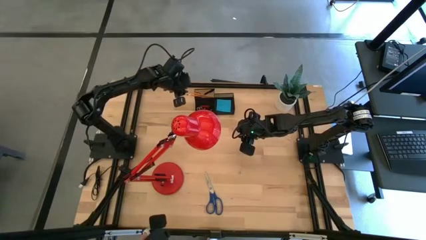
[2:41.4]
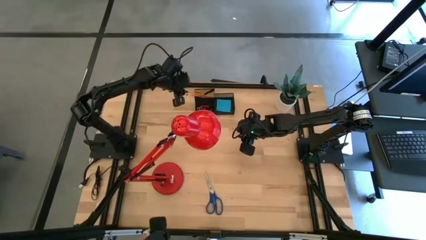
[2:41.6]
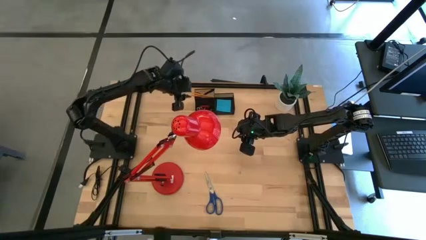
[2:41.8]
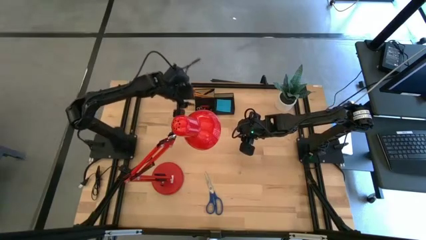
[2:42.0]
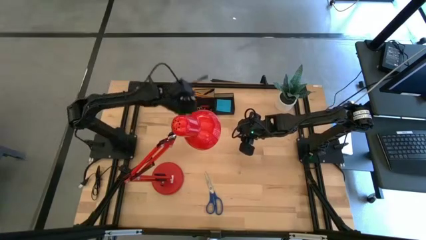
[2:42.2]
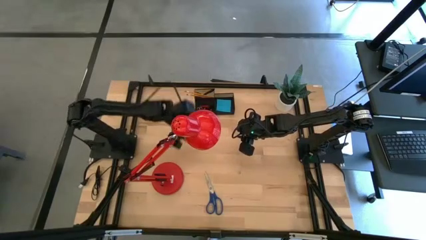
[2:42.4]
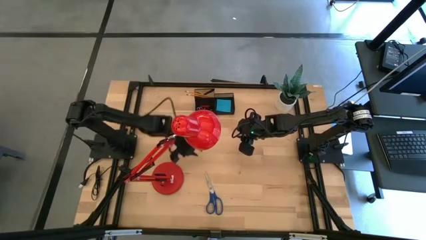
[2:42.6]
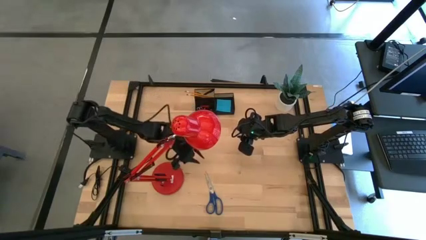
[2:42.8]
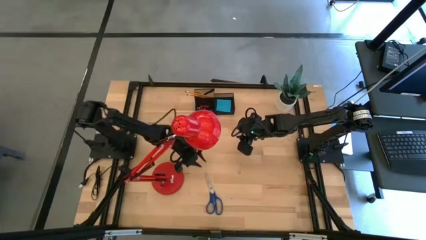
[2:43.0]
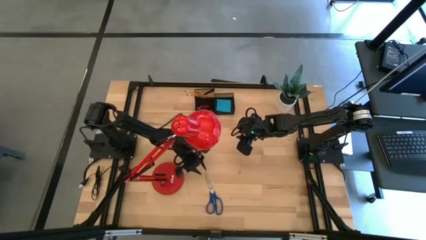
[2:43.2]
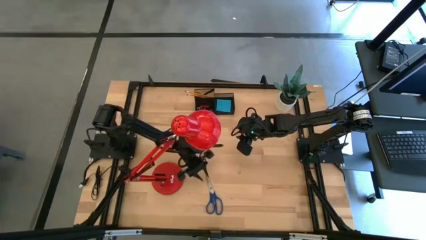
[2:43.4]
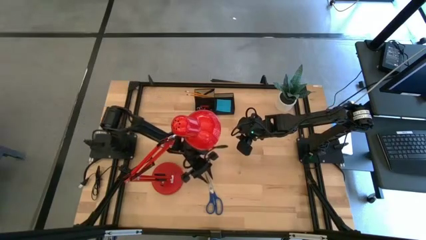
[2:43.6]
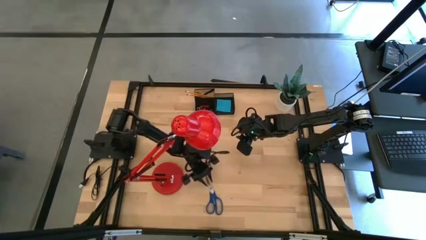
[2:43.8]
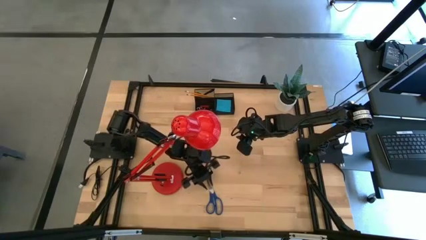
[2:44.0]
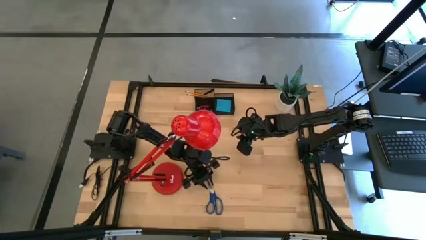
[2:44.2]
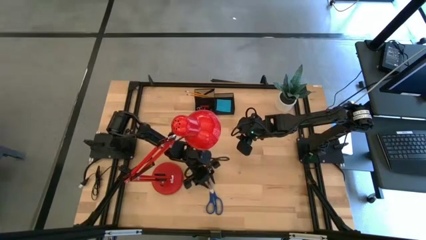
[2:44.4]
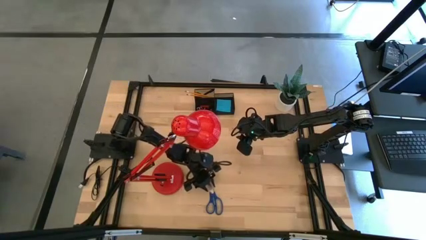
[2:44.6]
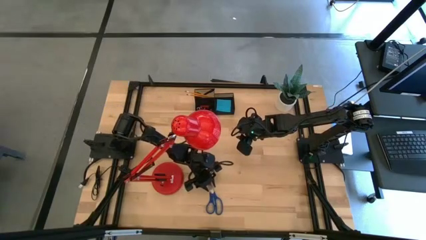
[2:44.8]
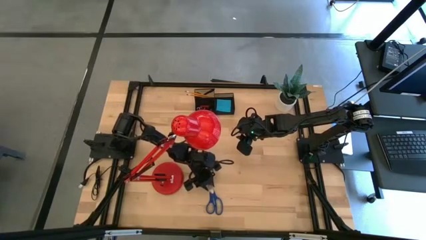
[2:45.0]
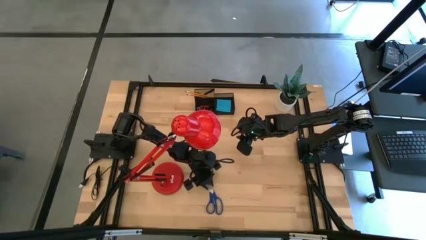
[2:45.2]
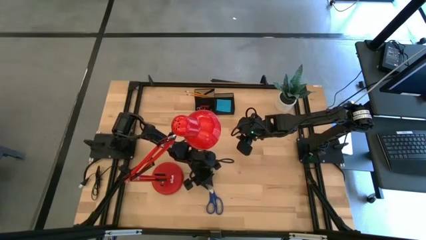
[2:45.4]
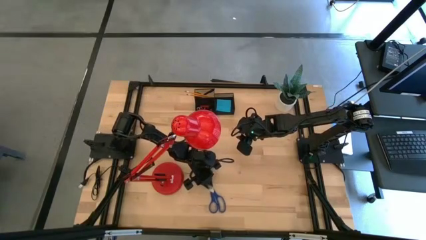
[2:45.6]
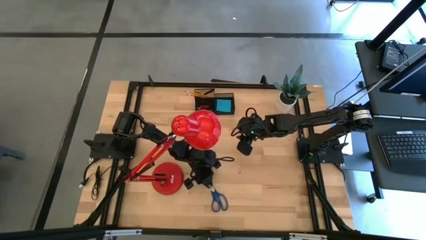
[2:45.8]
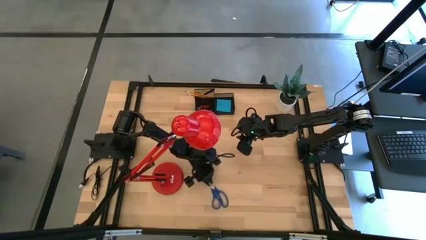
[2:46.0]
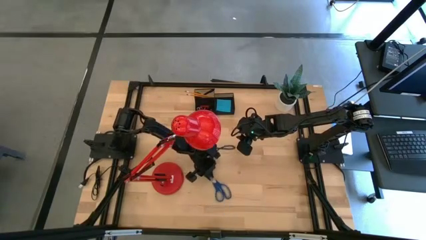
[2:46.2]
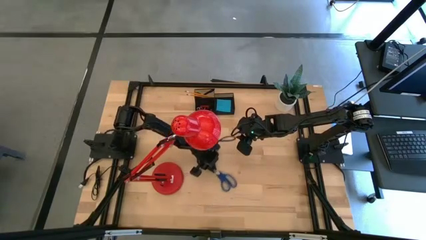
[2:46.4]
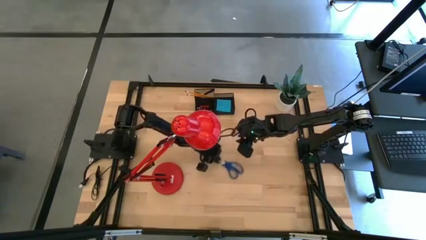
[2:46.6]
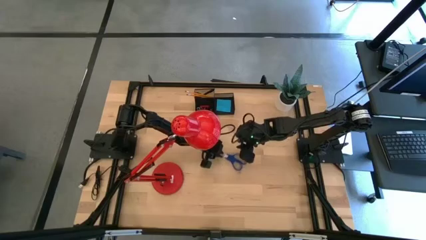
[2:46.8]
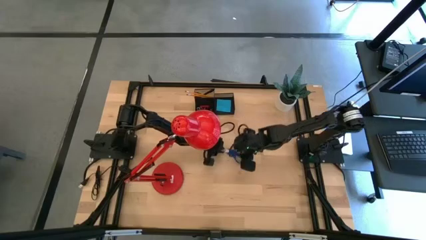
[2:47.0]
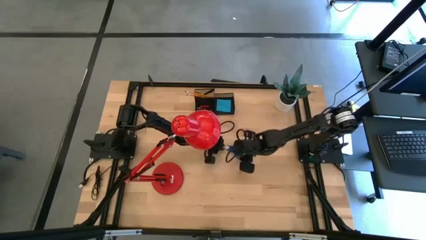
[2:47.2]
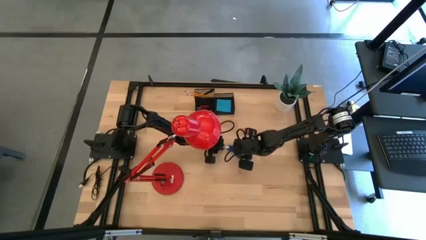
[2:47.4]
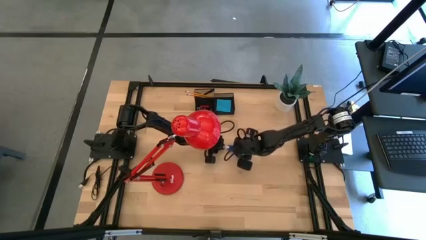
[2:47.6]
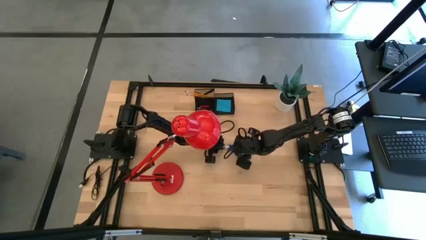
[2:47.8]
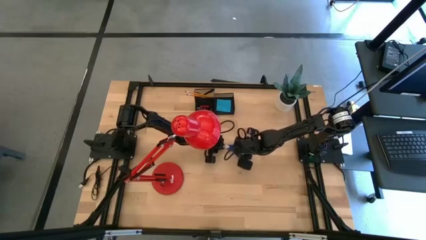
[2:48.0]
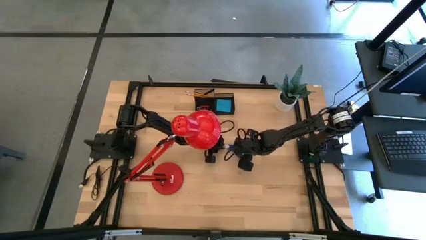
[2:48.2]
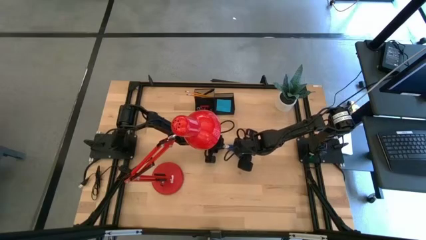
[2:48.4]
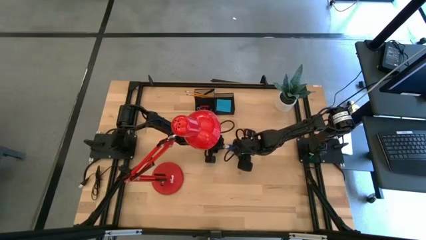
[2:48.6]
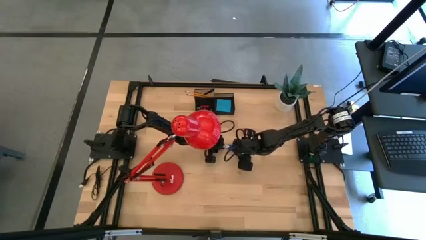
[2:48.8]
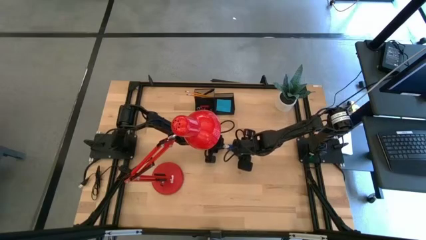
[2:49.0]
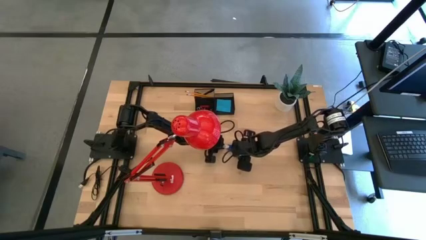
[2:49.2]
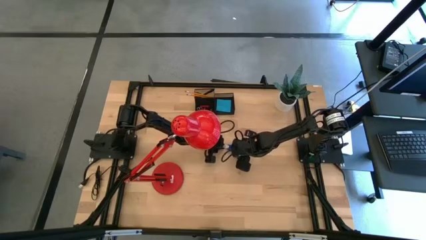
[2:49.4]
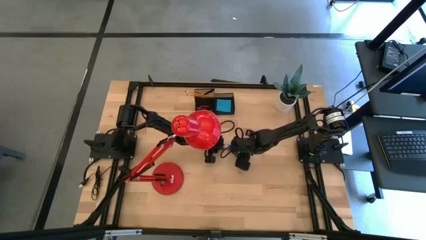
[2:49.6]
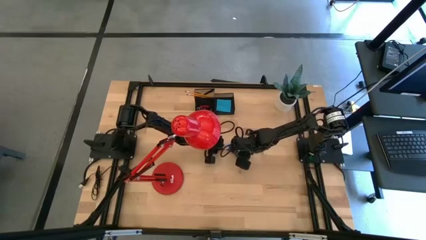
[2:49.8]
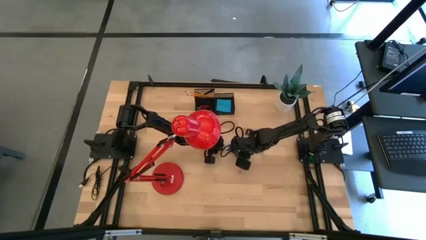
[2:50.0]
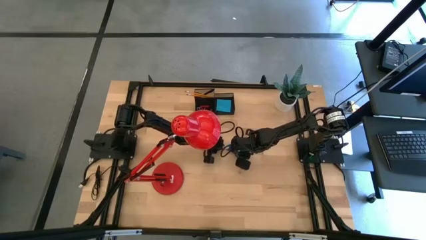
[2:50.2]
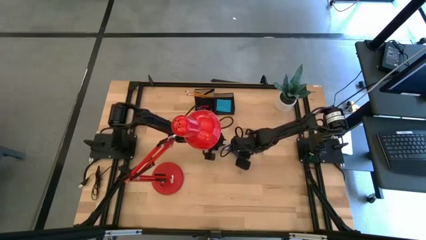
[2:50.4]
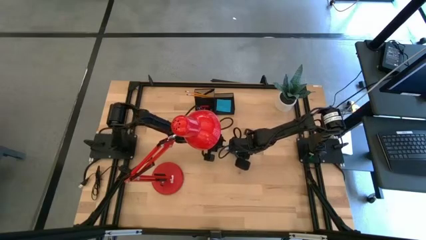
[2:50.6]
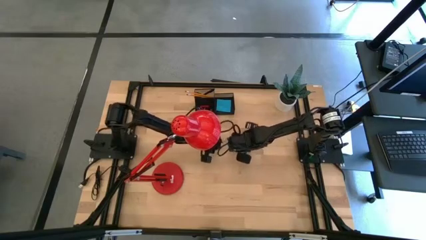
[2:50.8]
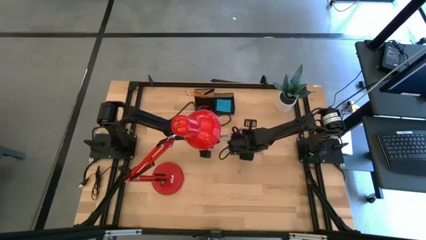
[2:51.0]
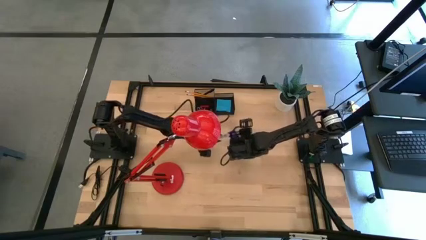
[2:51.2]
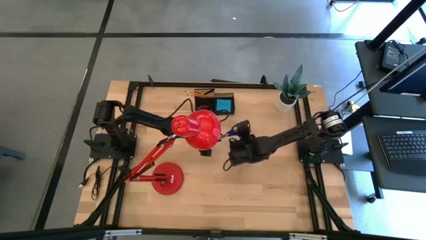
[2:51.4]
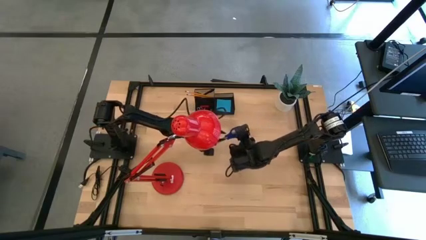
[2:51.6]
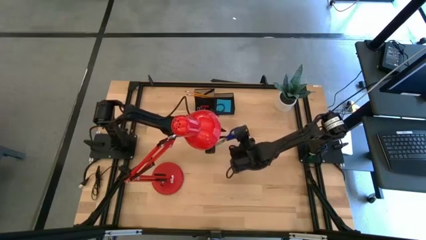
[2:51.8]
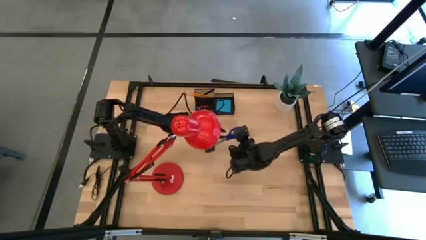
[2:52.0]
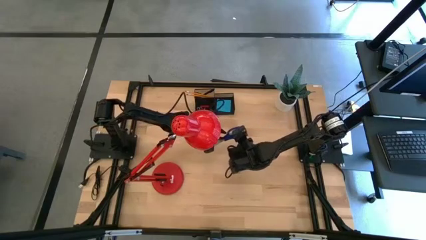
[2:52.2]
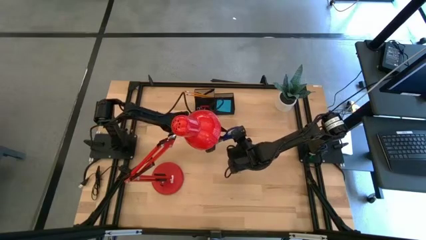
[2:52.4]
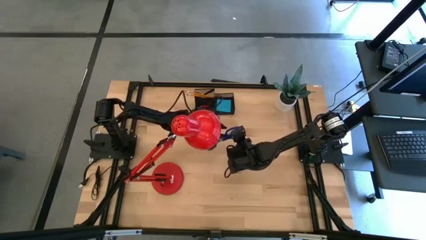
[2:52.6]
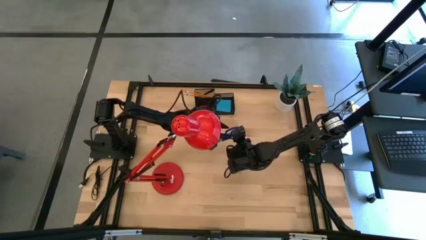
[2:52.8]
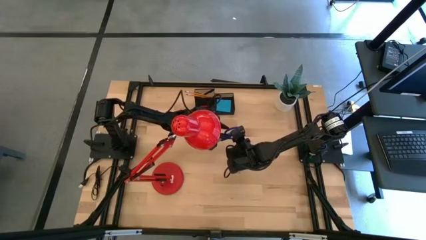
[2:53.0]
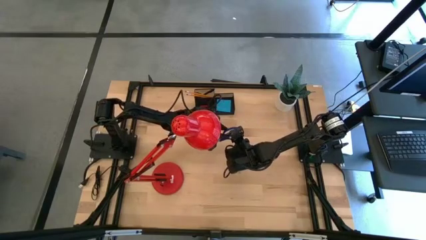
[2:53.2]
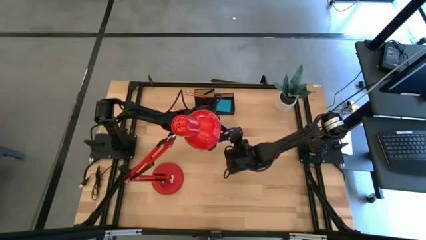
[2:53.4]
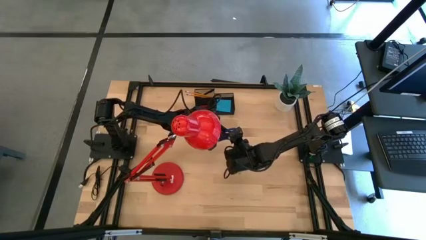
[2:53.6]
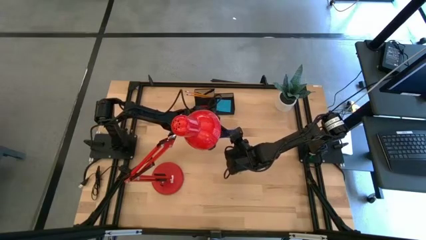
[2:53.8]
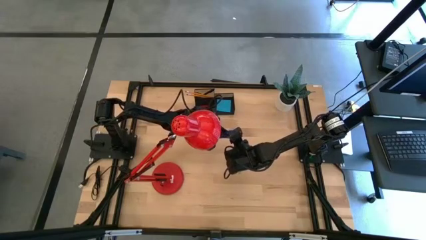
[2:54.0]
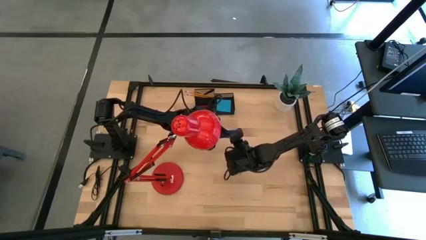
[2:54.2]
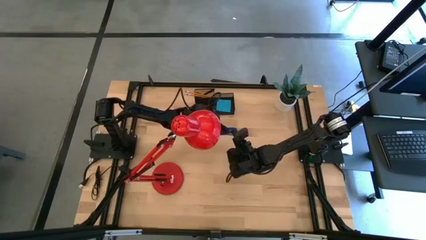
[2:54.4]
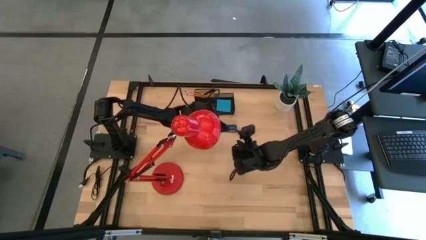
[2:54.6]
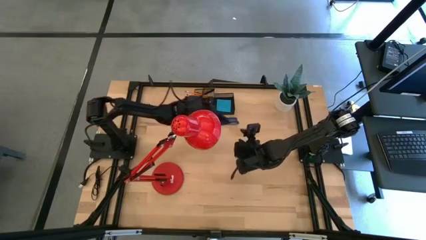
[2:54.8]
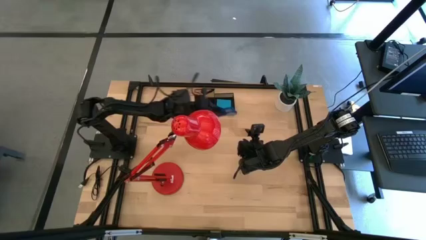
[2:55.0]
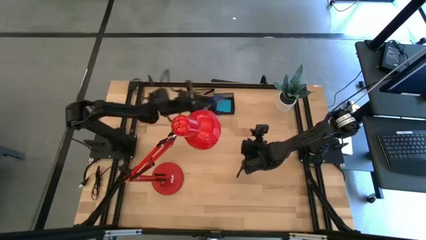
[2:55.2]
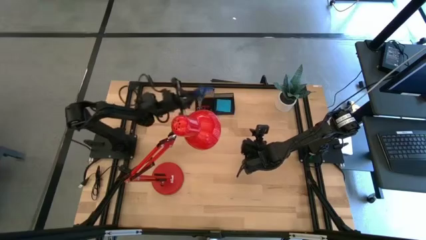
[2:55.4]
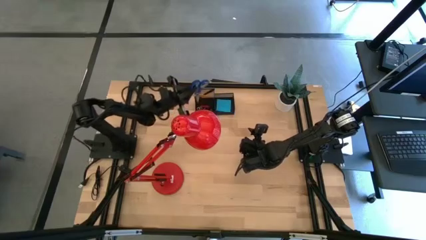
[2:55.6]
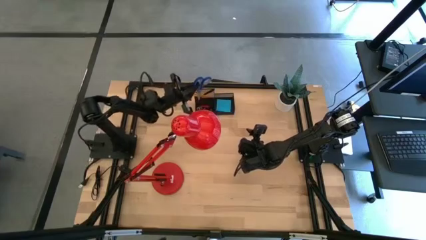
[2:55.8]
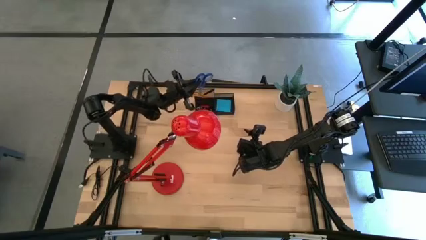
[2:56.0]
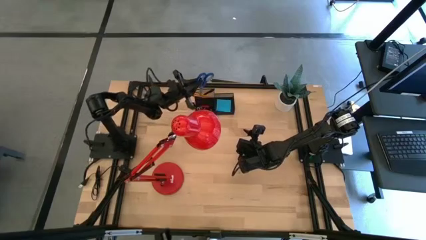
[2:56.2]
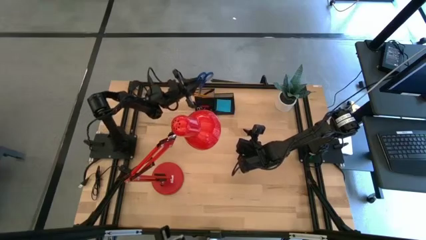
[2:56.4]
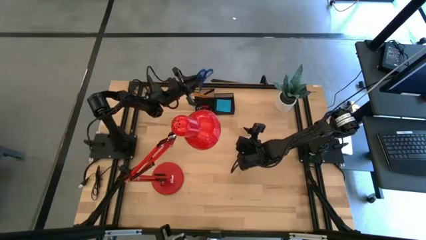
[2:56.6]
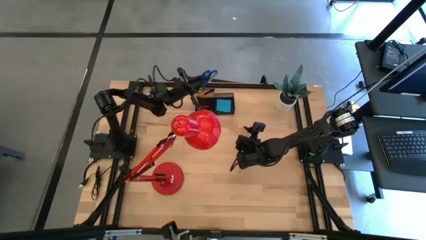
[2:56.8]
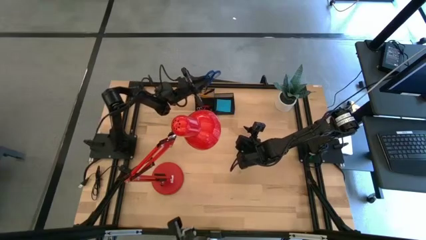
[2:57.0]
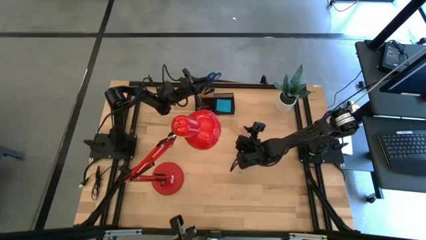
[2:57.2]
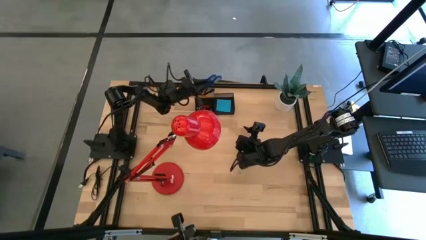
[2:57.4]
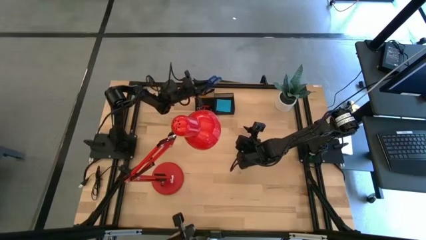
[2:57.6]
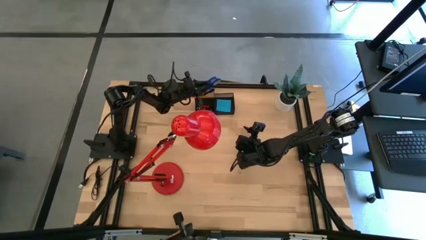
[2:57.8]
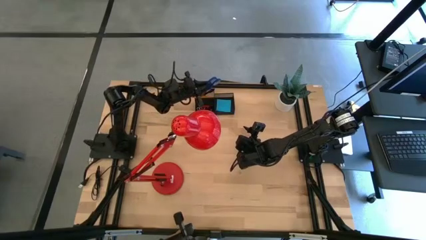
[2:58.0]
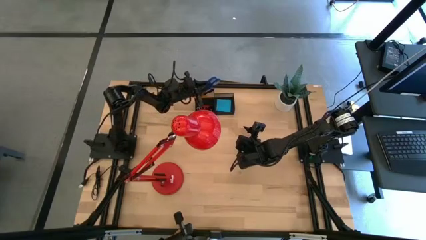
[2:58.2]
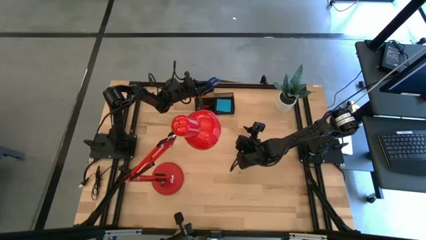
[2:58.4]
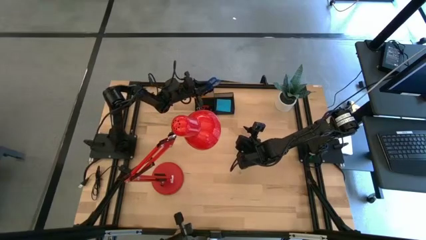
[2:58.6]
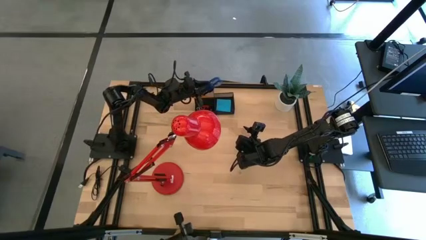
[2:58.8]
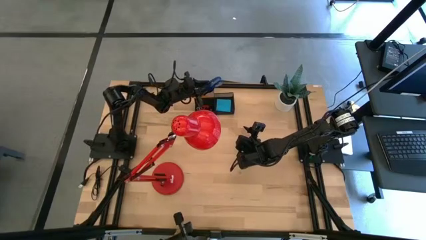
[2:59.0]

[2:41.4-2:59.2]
Task: Pick and place office supplies into organizer
Put the scissors into the desk organizer
